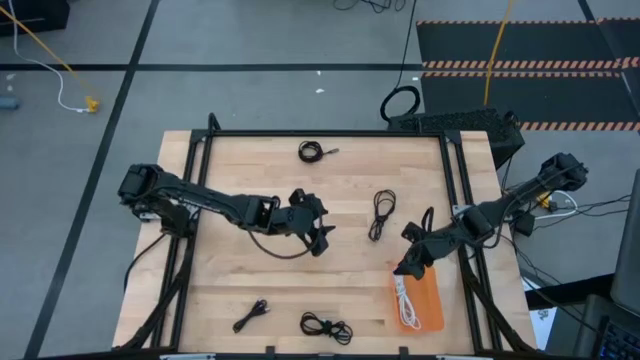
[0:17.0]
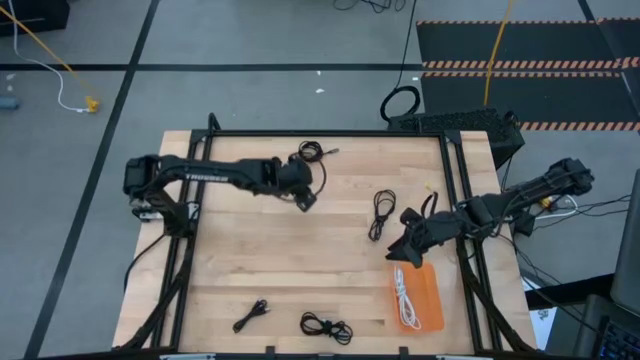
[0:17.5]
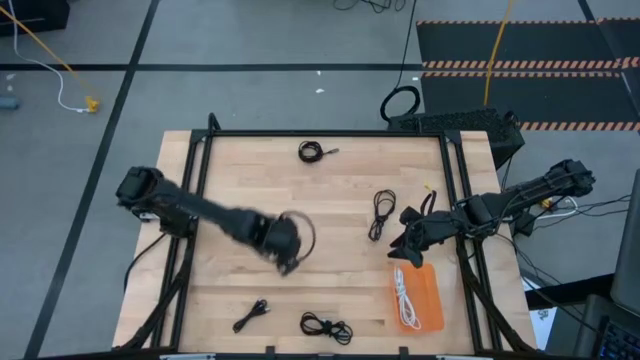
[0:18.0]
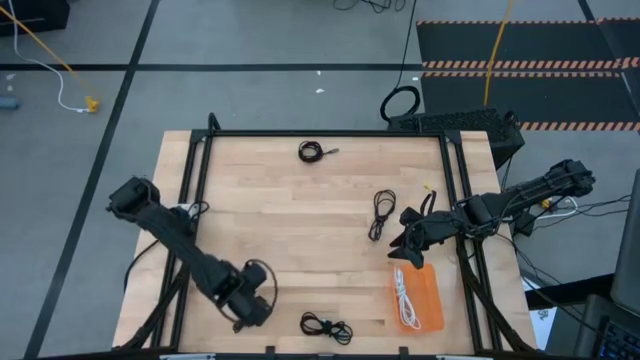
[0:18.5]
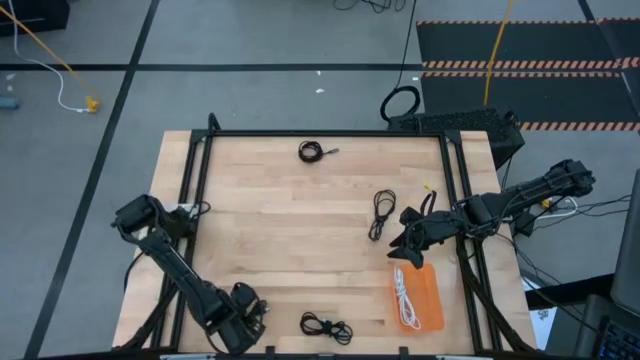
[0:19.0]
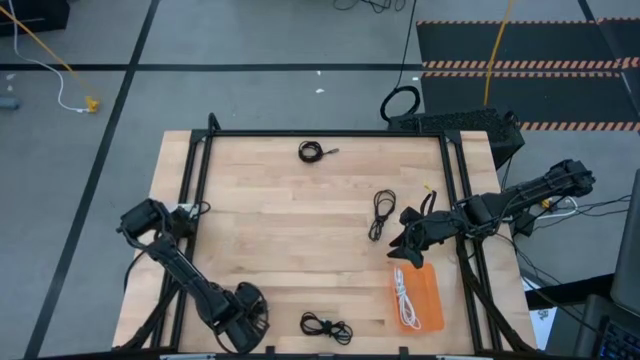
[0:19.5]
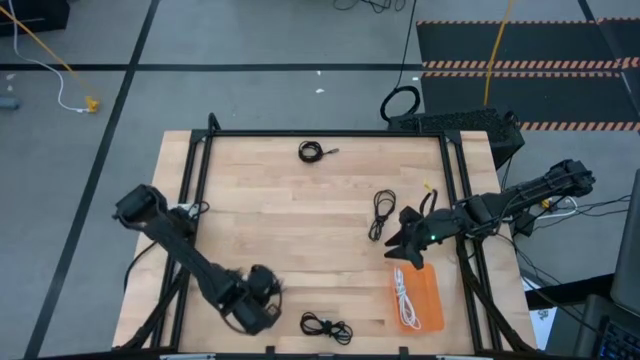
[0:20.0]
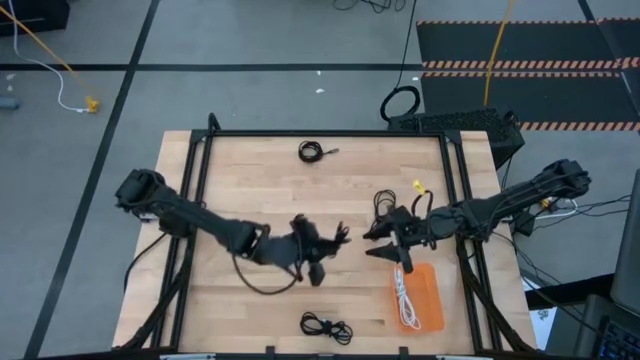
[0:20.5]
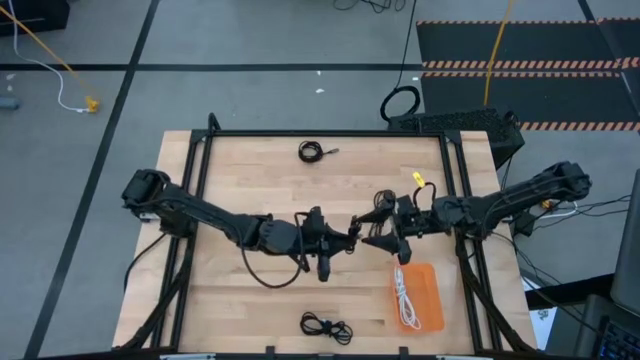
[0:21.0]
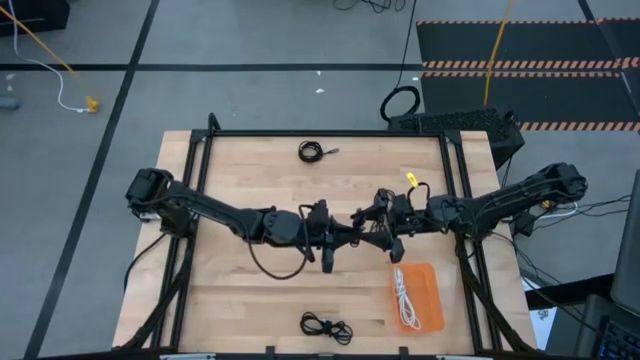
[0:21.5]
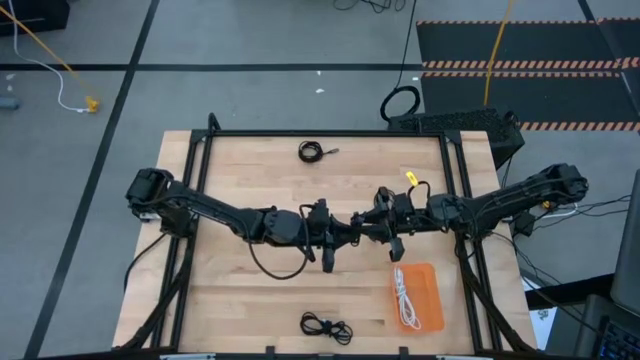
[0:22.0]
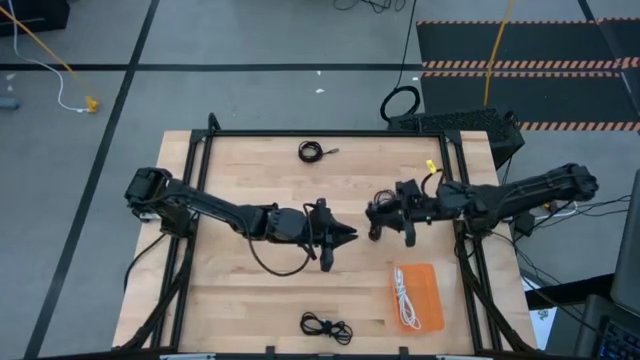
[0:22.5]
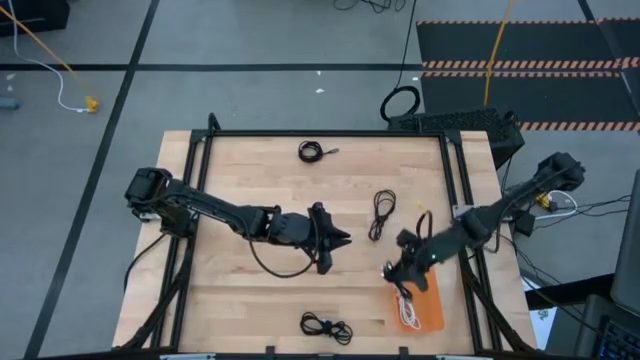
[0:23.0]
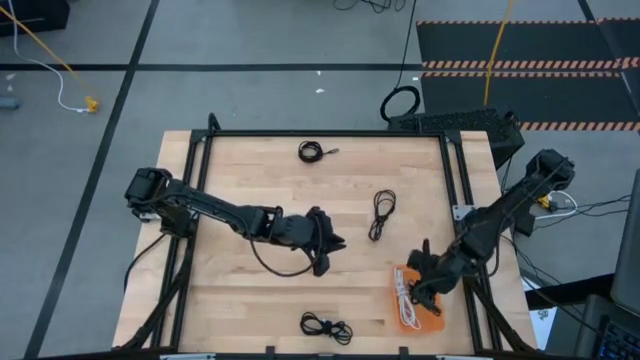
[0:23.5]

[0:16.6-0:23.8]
Task: Pick and place USB-C Cables
Put the bottom left black charger cable into the orange bin

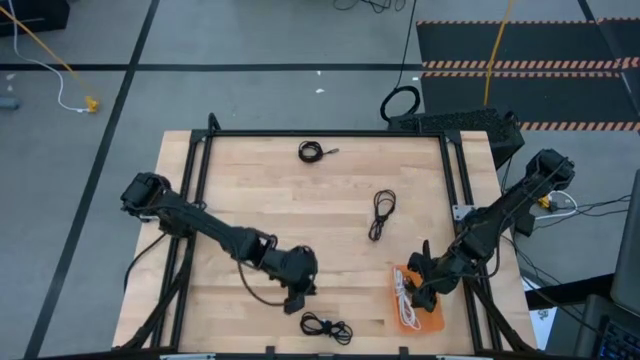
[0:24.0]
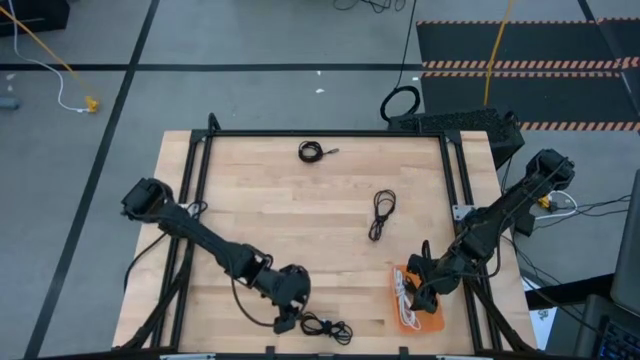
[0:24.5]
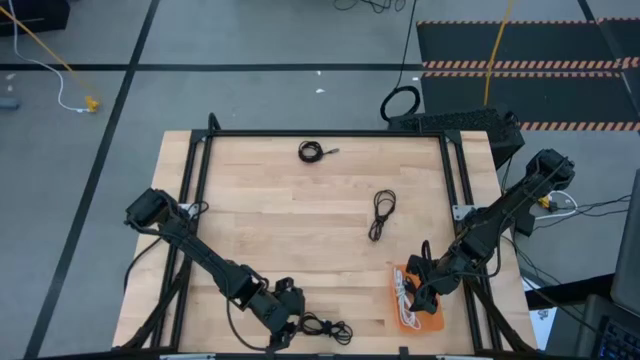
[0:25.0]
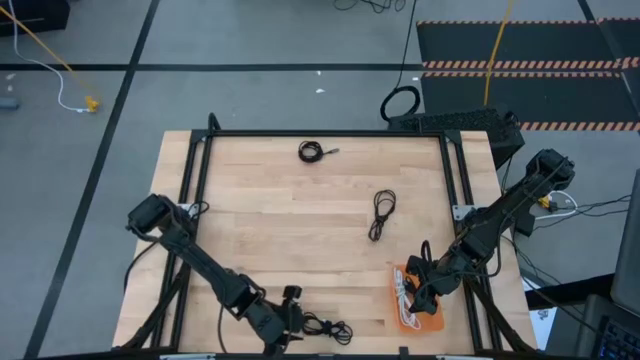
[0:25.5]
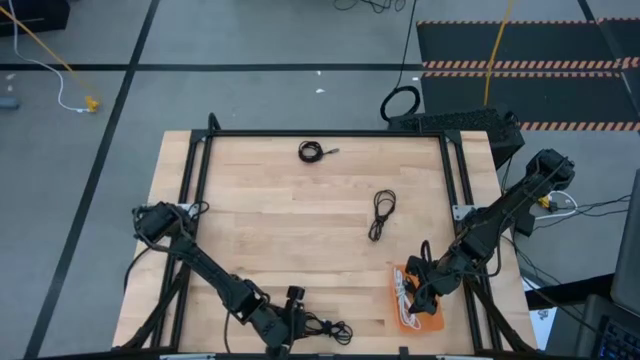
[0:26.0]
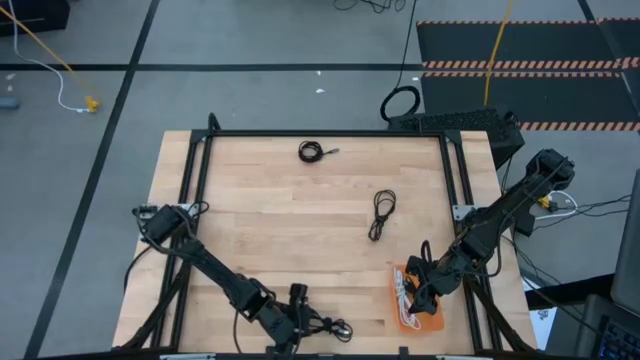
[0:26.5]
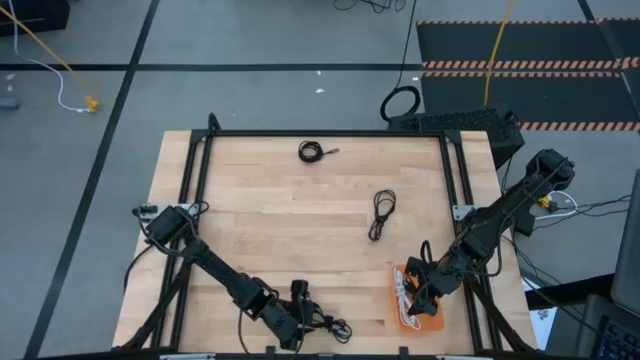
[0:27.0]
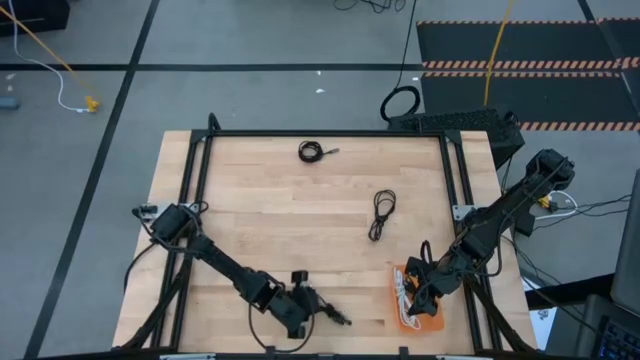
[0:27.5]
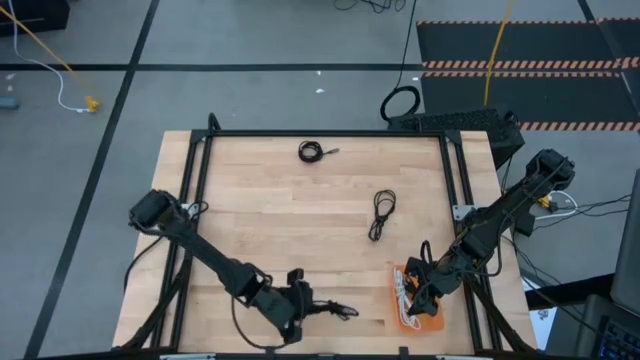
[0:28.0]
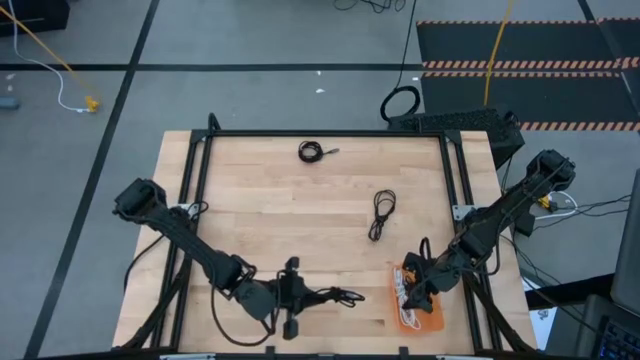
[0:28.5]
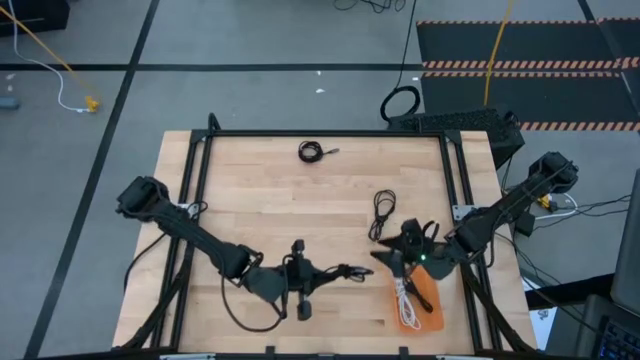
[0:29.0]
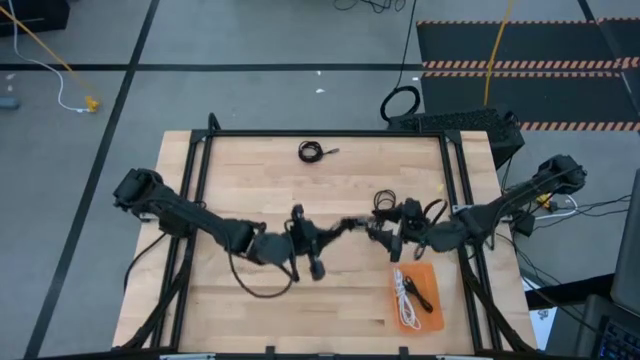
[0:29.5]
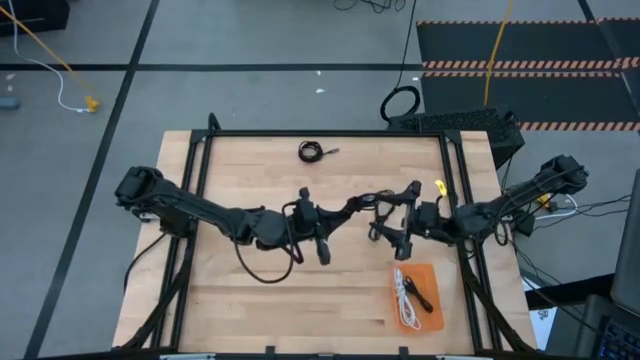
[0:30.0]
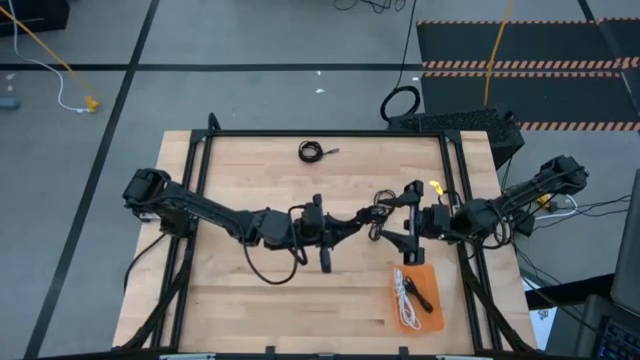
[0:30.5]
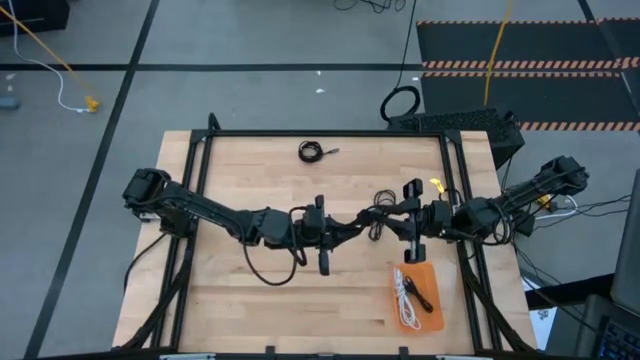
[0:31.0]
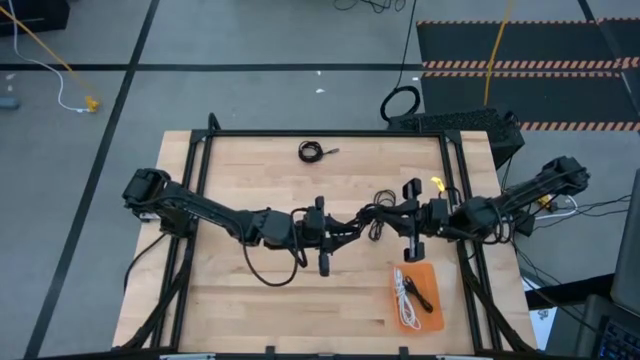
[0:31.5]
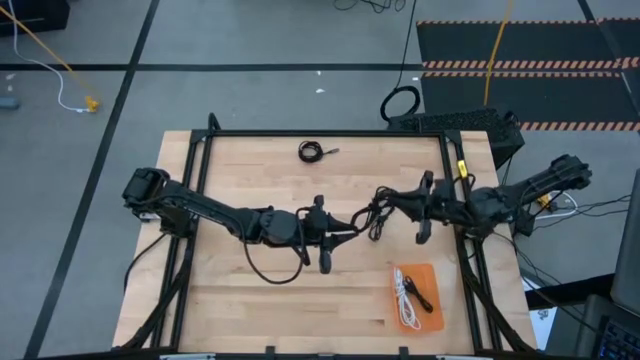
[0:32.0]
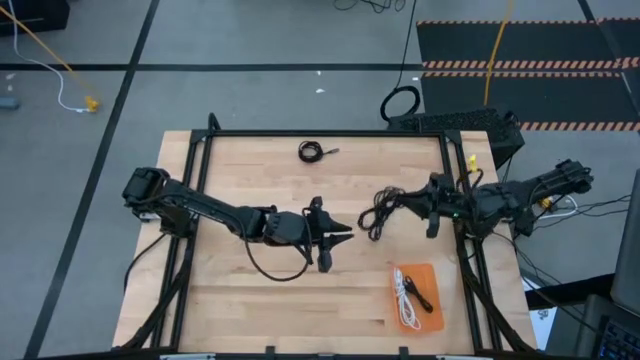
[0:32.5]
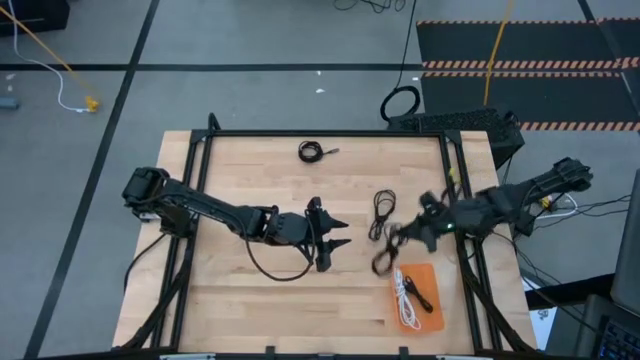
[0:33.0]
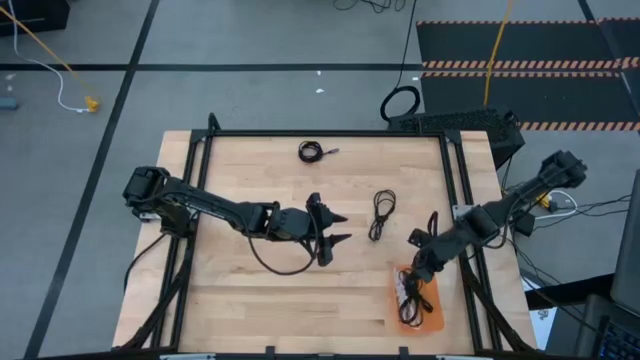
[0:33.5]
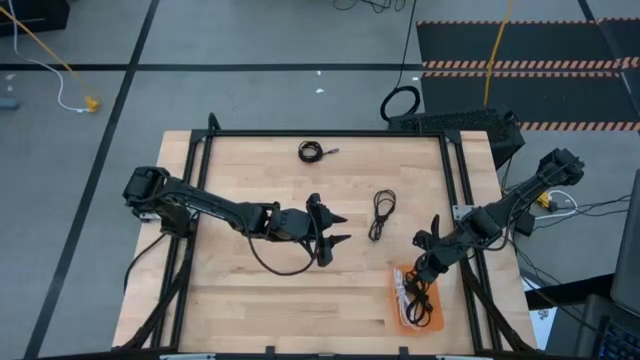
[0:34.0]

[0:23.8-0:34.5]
Put the bottom left black charger cable into the orange bin

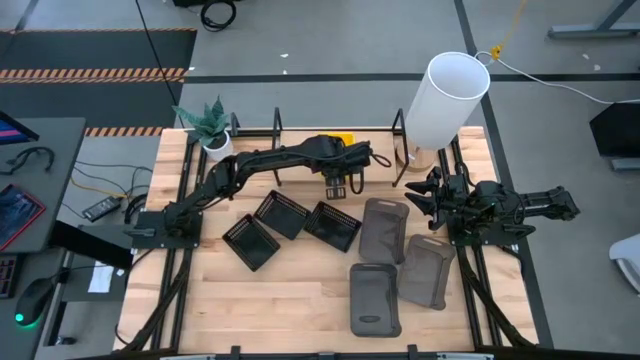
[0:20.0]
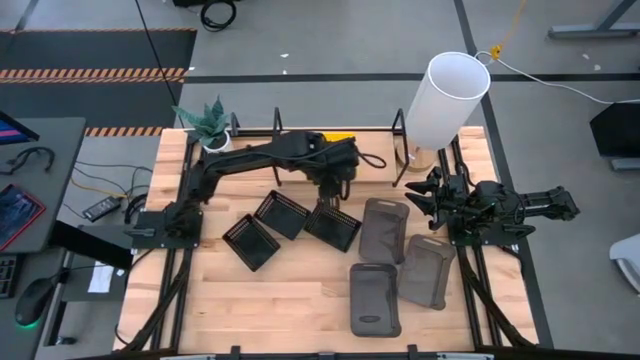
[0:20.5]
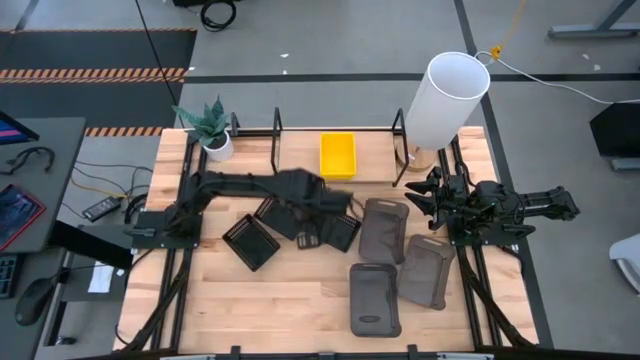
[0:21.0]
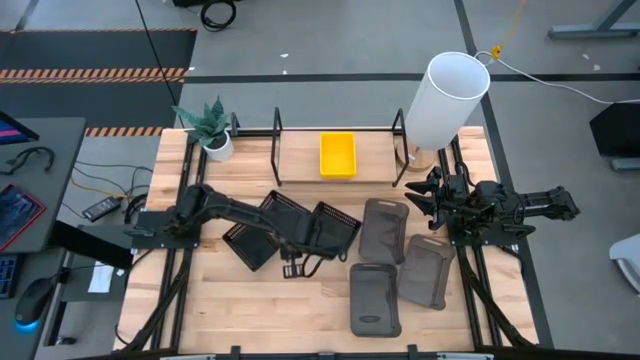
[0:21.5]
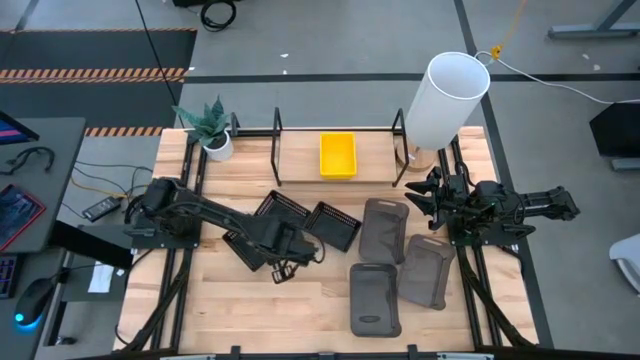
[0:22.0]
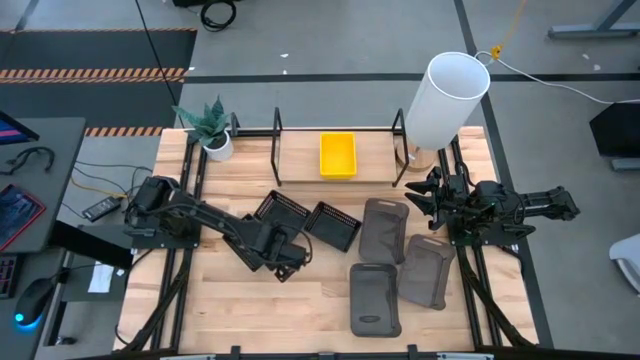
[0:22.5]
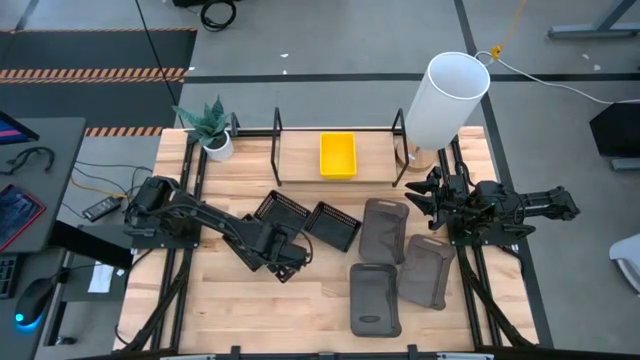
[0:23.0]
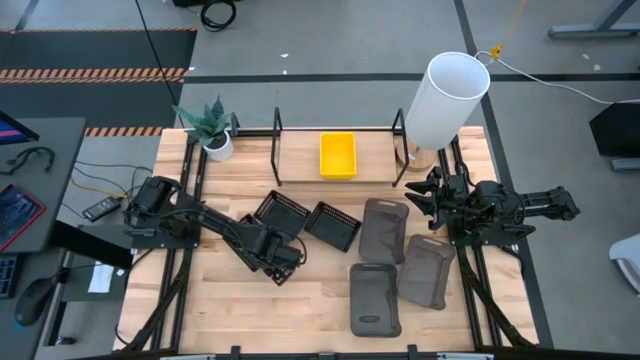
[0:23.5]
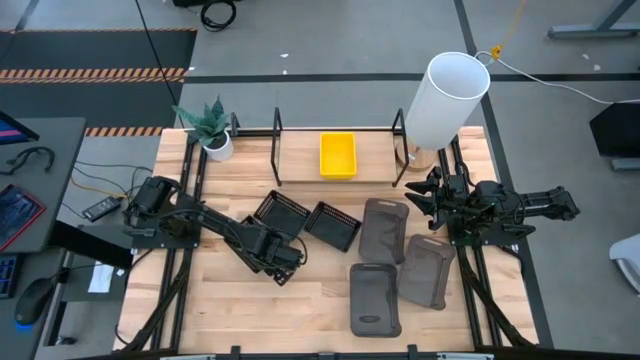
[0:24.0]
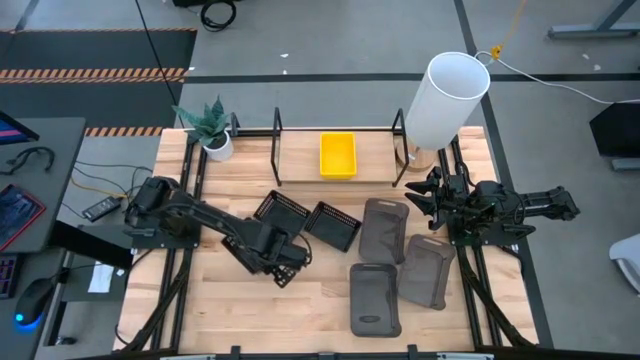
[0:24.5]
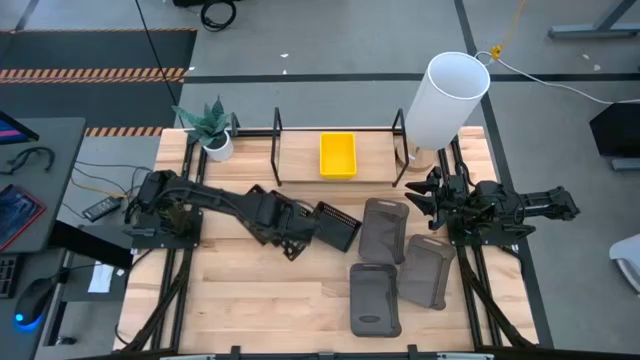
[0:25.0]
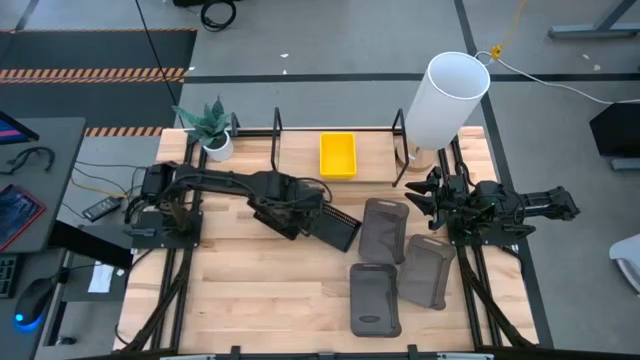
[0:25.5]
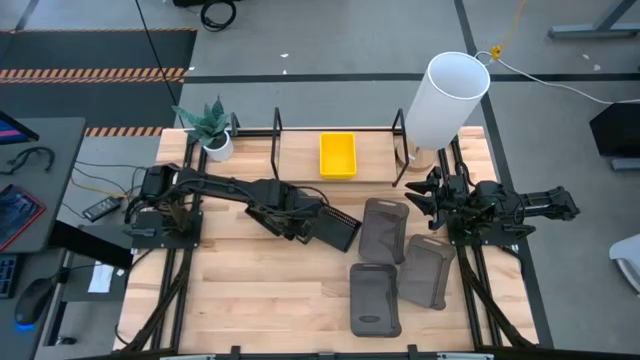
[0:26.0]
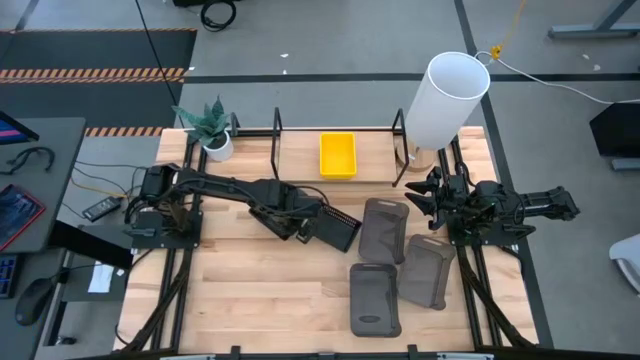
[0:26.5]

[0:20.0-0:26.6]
Task: Stack baskets on shelf by color
Stack the left black bin on top of the middle black bin
